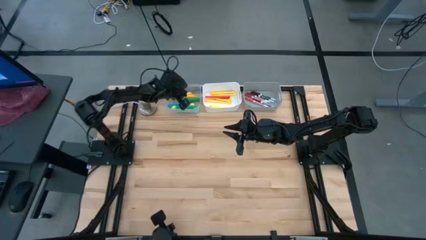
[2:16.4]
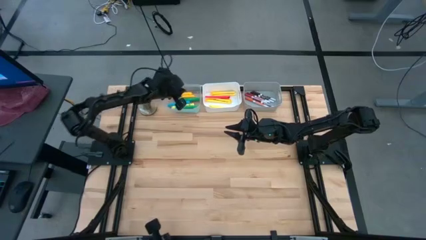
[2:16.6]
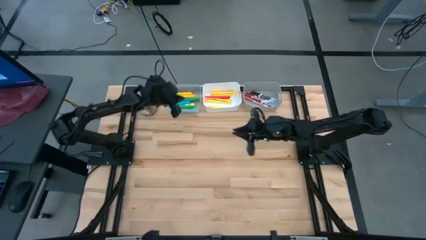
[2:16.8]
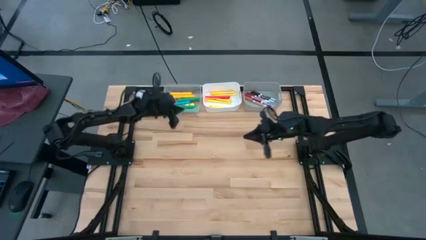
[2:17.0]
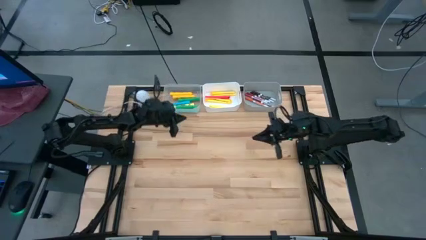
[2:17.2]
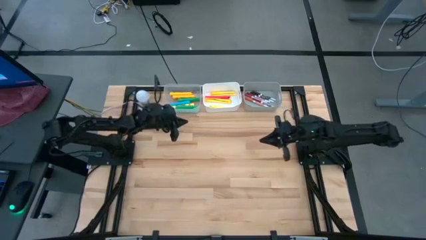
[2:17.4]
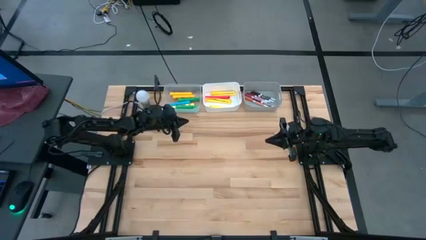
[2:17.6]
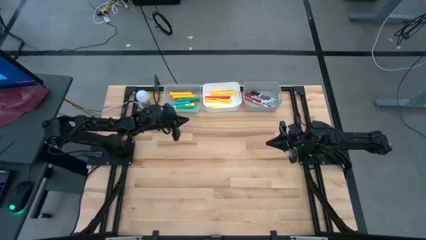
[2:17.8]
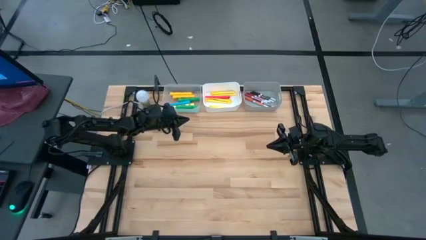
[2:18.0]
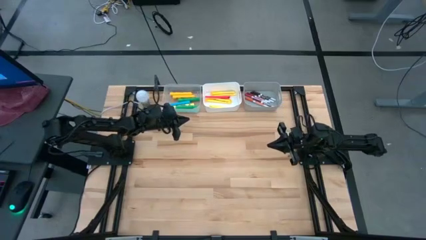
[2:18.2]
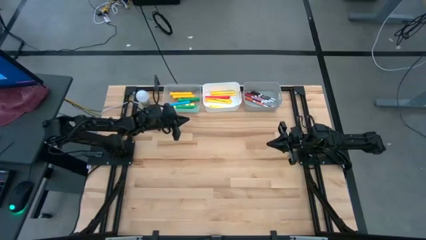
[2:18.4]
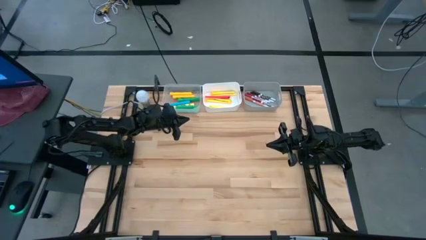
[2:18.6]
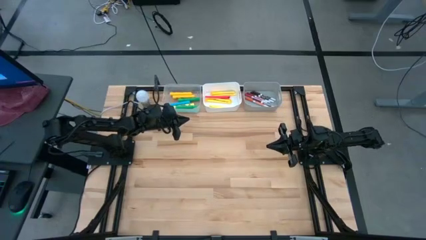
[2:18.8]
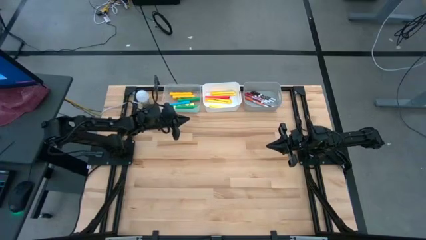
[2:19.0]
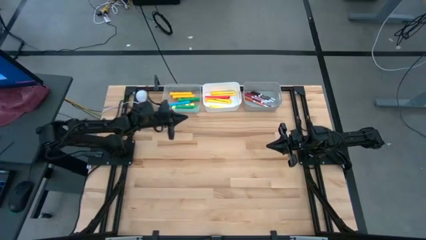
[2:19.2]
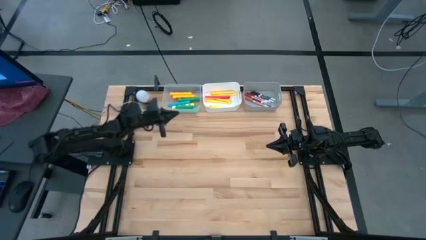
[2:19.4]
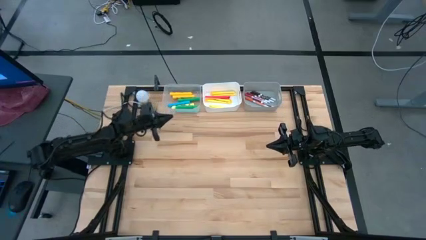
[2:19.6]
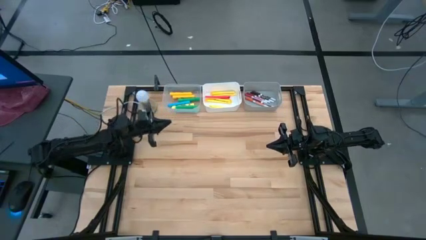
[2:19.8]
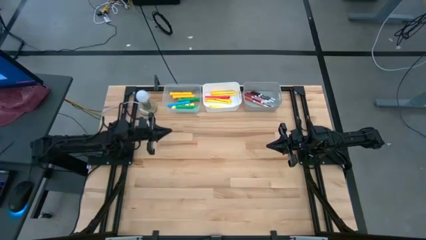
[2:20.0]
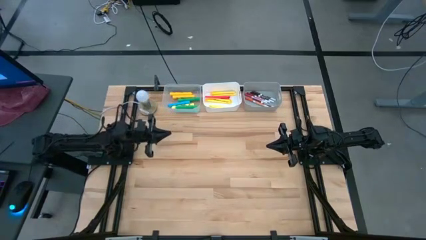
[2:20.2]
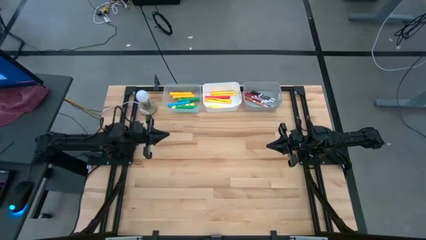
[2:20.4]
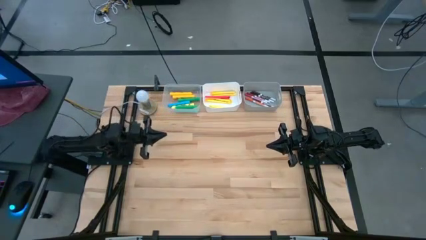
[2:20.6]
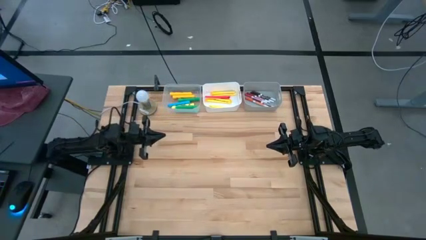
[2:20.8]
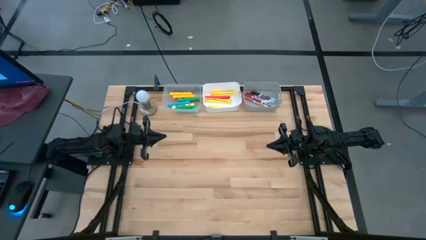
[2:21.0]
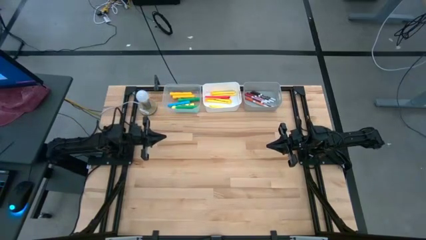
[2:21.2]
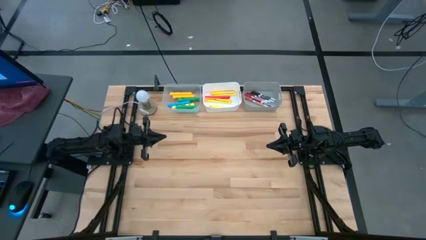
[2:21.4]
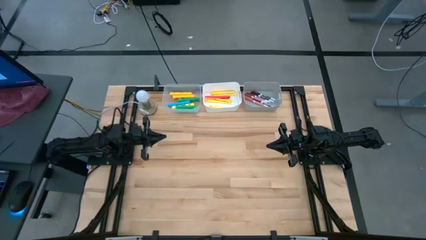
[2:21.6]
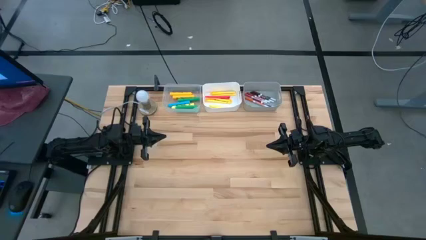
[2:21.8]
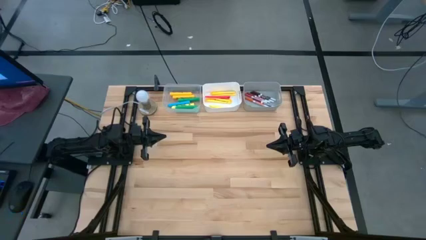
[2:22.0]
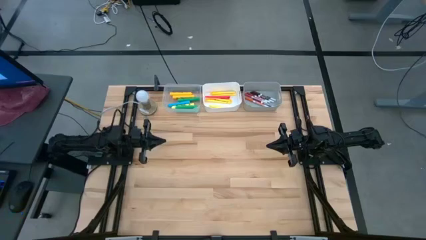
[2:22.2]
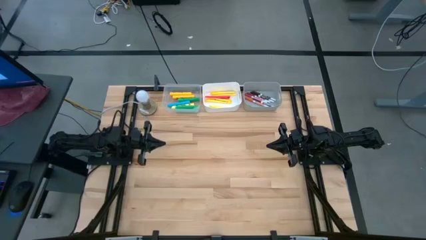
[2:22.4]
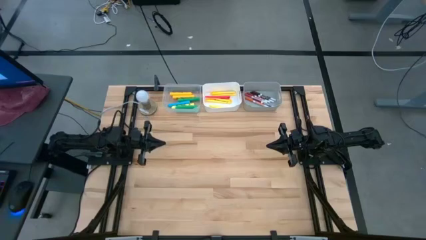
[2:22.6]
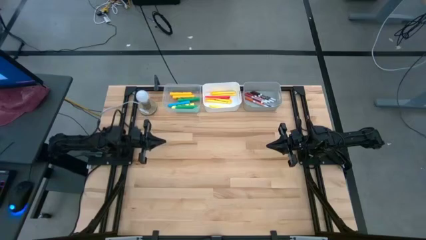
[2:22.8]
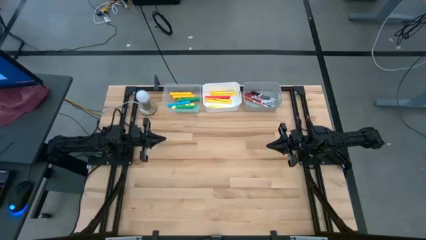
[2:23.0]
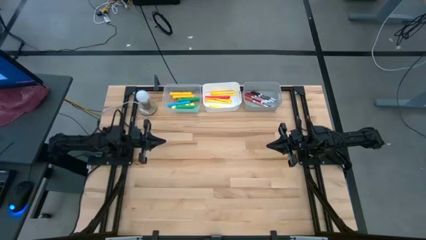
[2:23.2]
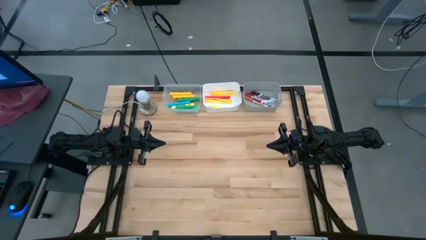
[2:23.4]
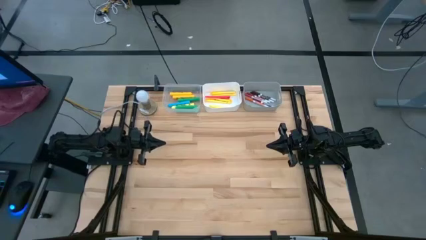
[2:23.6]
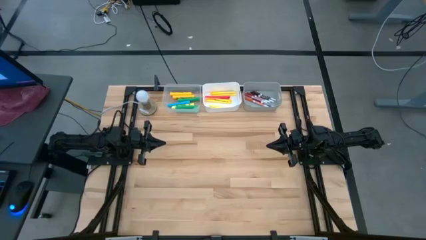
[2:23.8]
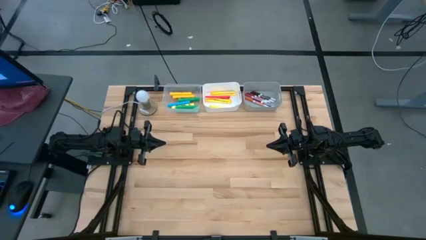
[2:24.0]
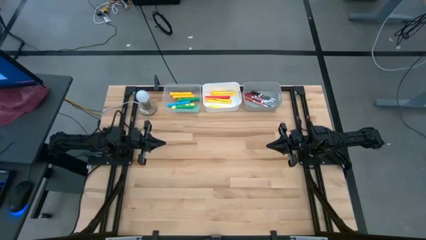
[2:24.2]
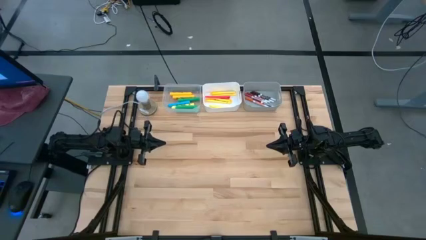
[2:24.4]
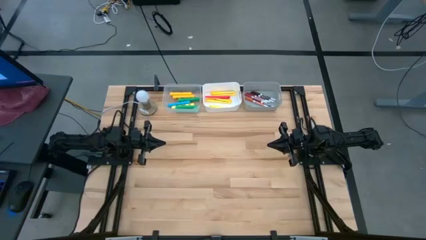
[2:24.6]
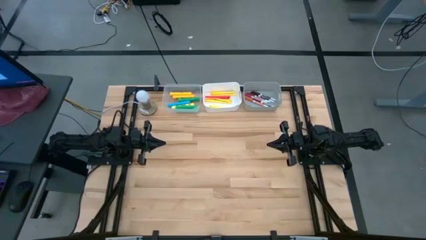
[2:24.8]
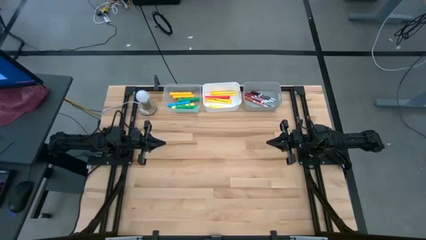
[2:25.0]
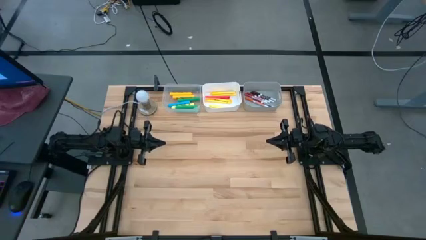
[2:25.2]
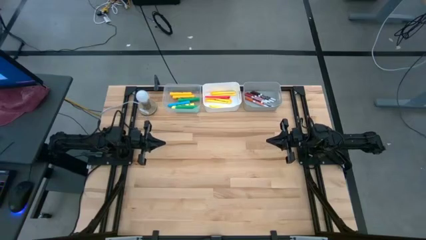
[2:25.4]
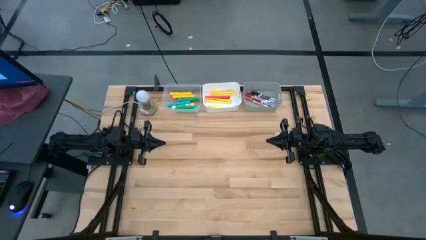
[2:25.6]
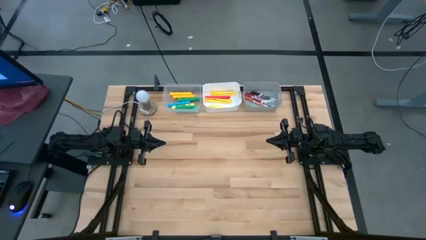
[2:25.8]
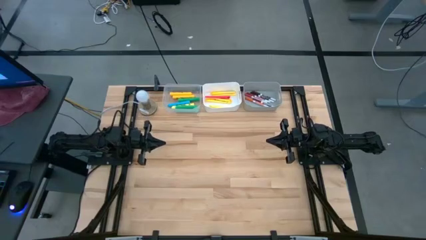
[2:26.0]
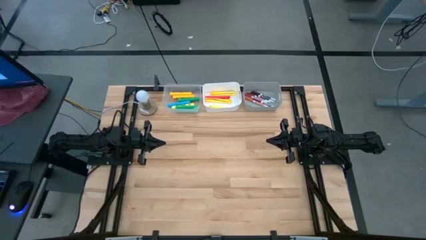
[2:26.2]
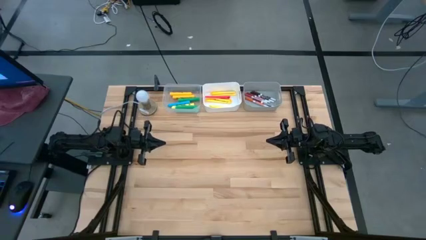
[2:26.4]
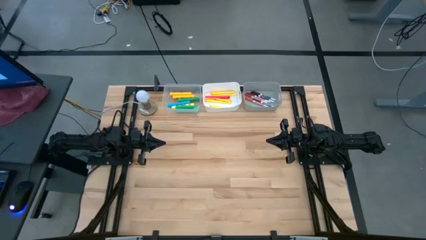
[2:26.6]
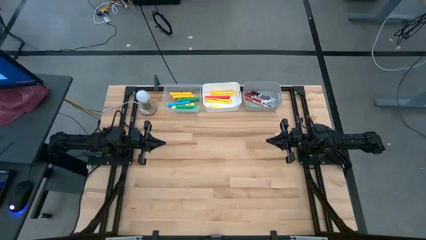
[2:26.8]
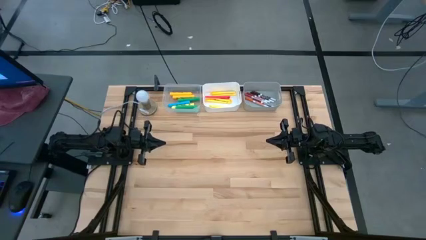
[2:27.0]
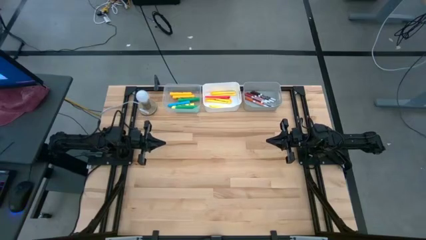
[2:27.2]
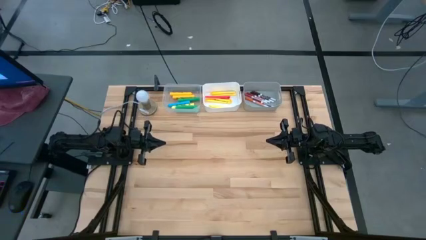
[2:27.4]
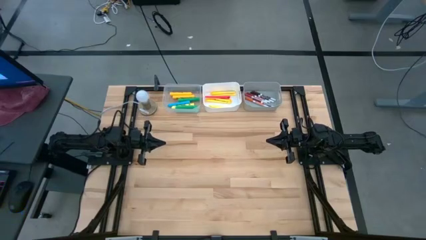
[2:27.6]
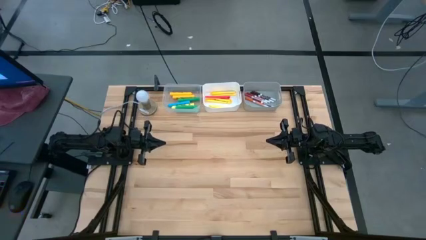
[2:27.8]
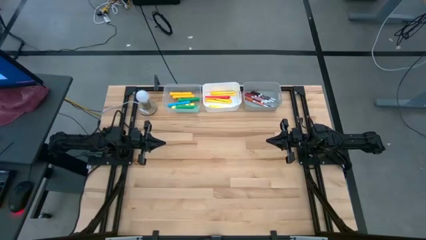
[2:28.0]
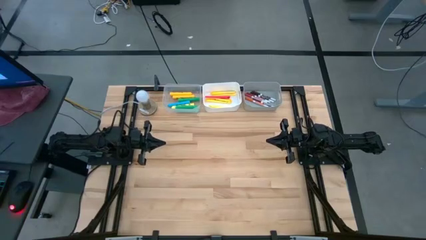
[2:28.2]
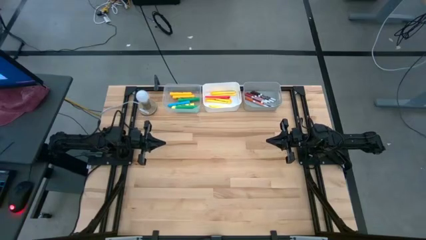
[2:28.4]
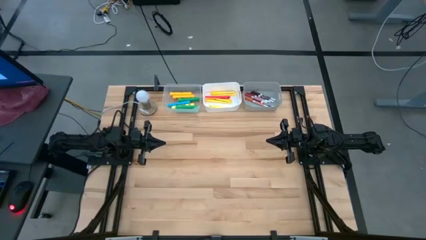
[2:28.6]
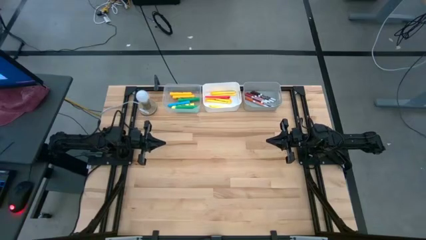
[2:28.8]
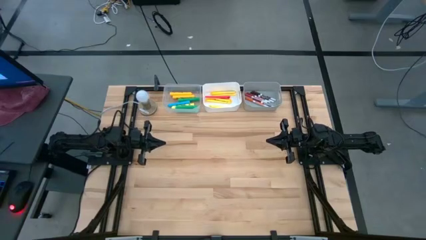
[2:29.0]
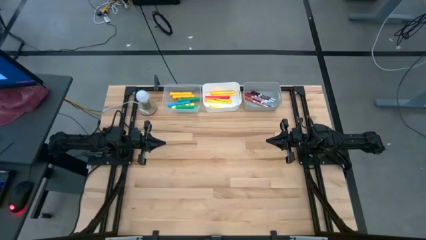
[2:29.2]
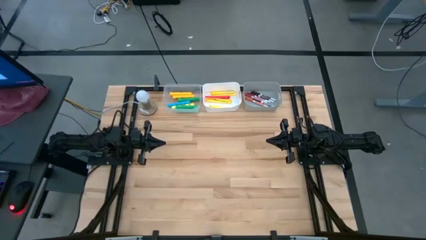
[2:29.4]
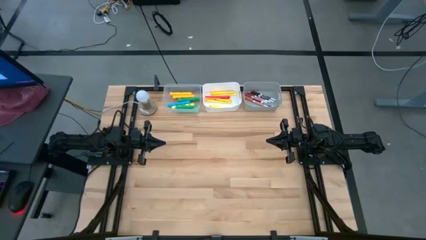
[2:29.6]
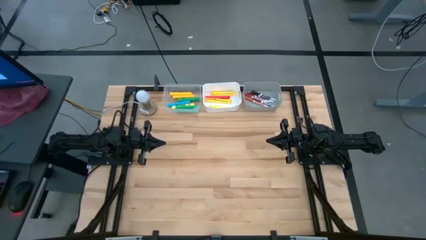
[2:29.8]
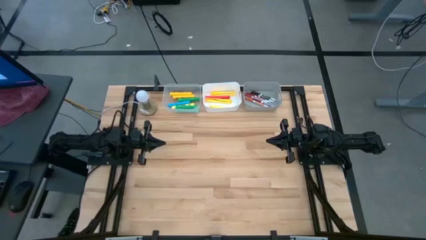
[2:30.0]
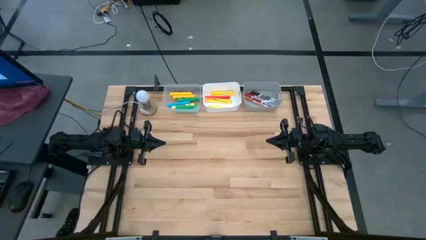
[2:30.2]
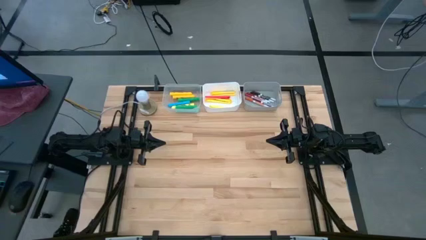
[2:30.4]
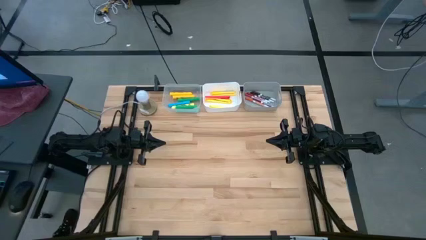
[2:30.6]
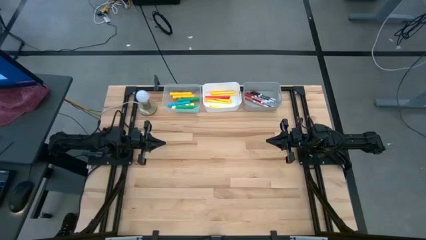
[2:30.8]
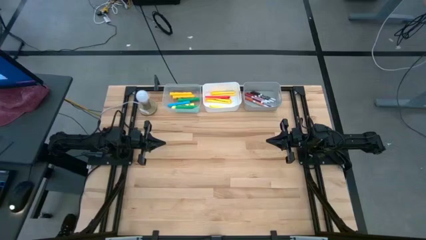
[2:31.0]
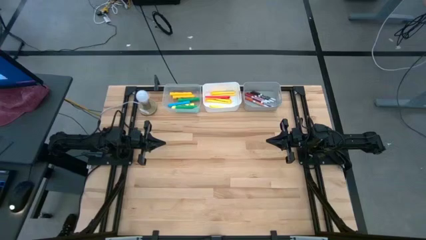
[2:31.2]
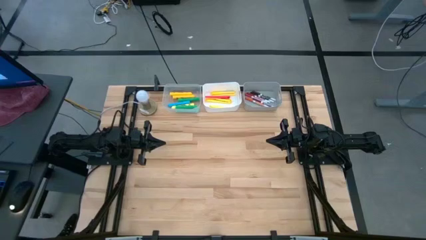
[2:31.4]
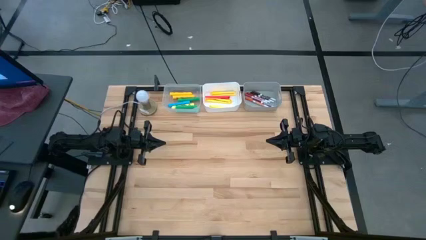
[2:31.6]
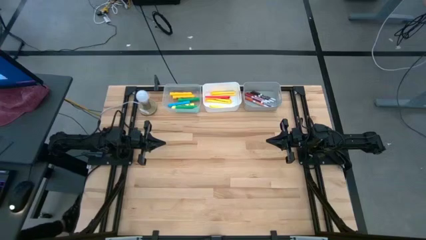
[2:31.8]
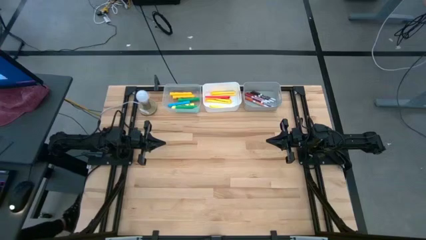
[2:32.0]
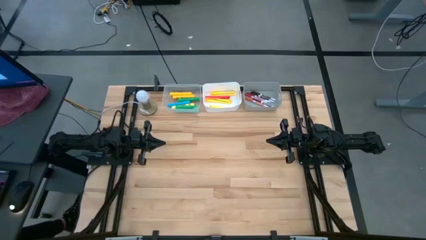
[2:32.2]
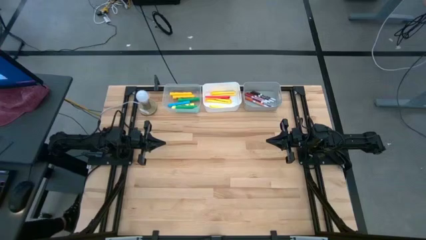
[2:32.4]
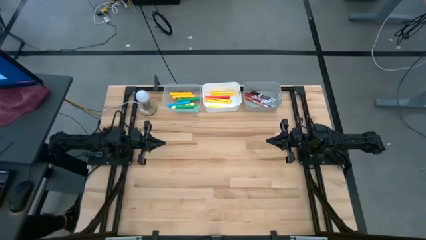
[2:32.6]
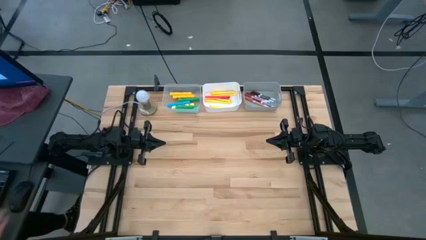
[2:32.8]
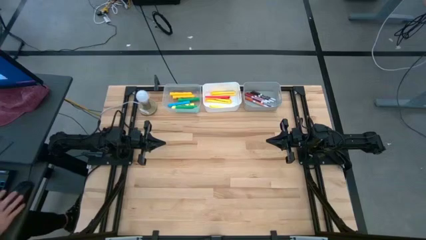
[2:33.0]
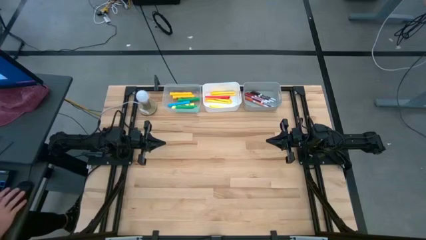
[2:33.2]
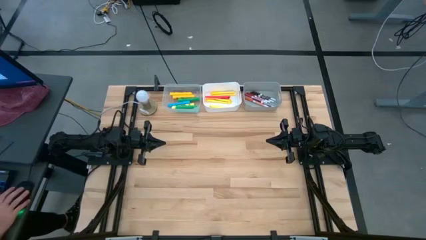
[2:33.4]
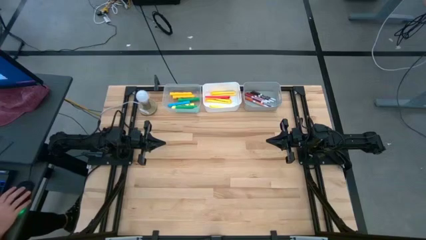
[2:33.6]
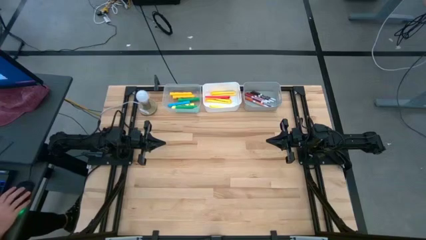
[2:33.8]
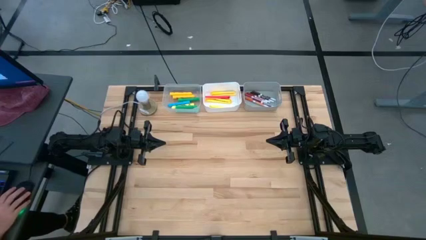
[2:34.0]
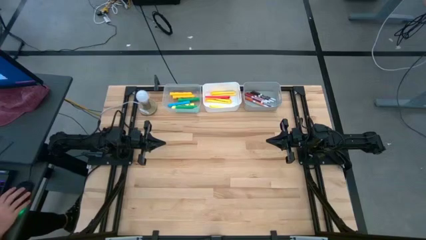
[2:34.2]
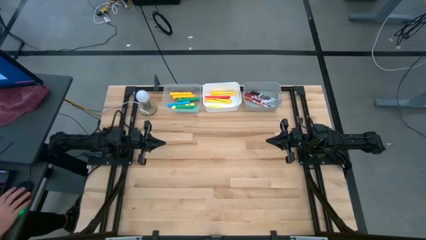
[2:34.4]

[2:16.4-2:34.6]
Task: Pick & Place Markers
Return to Home Position
